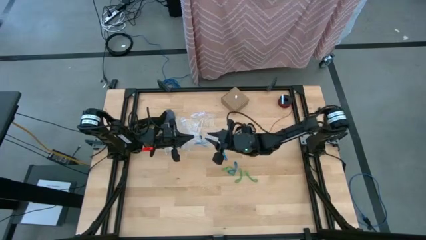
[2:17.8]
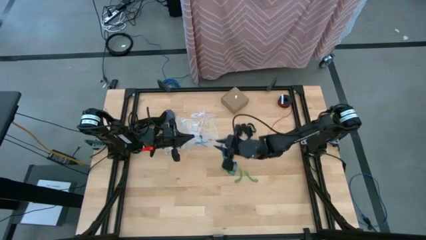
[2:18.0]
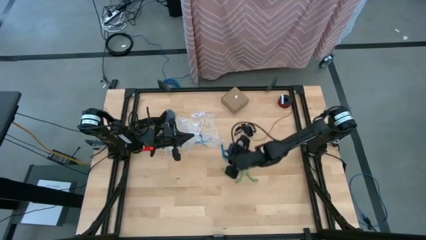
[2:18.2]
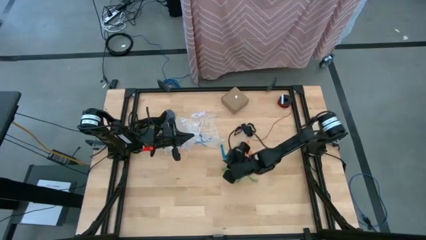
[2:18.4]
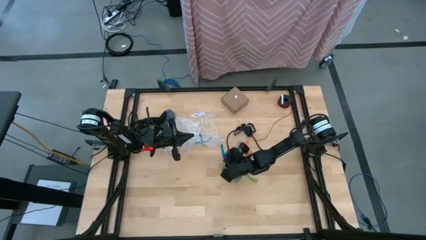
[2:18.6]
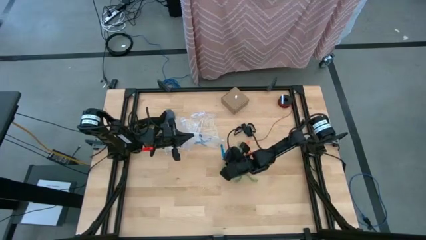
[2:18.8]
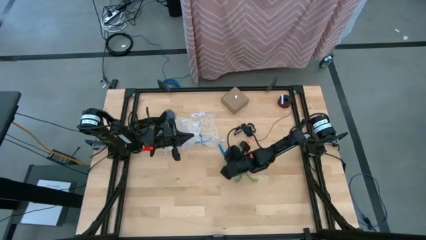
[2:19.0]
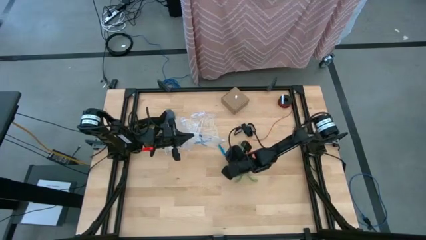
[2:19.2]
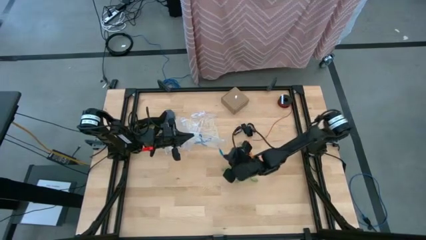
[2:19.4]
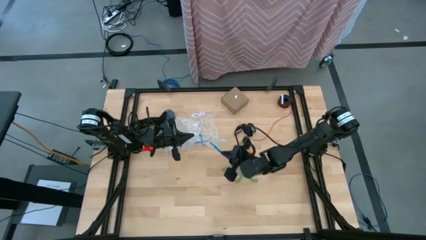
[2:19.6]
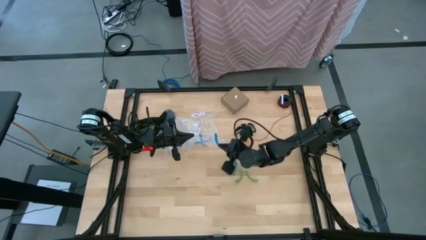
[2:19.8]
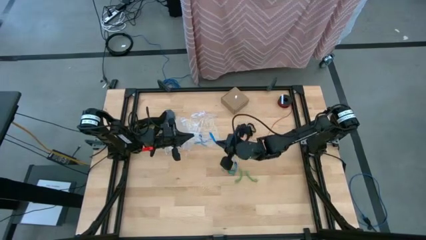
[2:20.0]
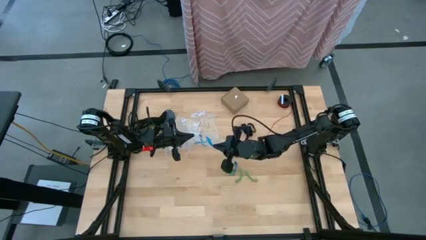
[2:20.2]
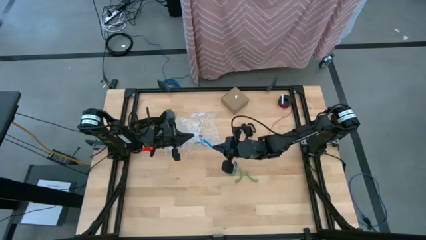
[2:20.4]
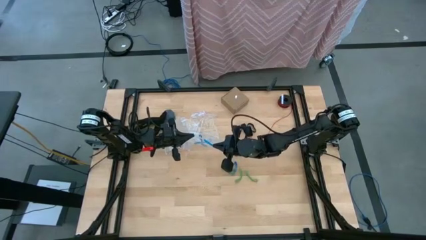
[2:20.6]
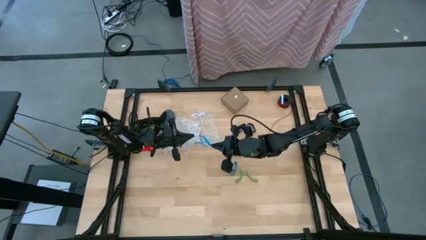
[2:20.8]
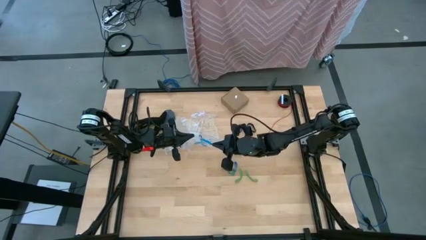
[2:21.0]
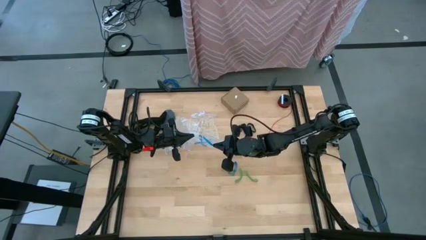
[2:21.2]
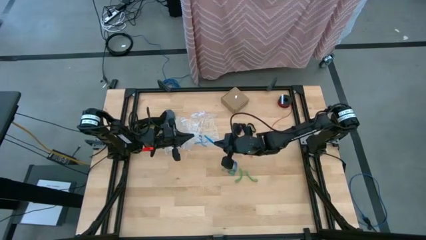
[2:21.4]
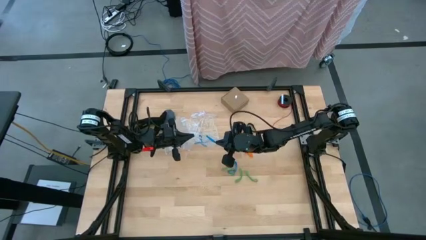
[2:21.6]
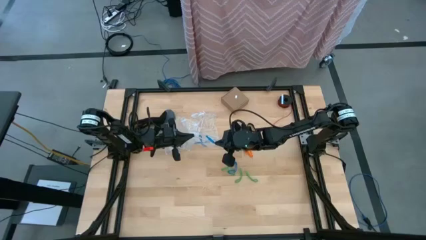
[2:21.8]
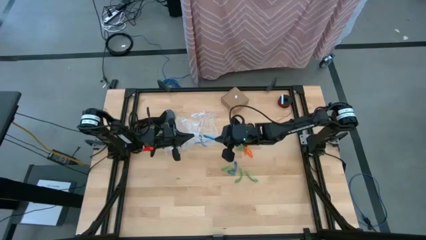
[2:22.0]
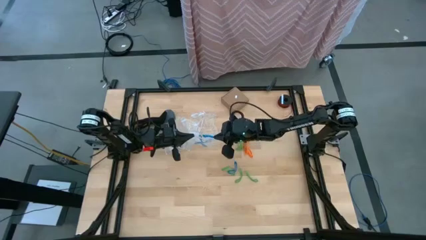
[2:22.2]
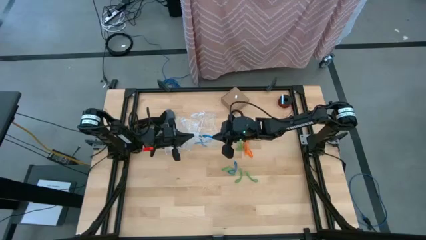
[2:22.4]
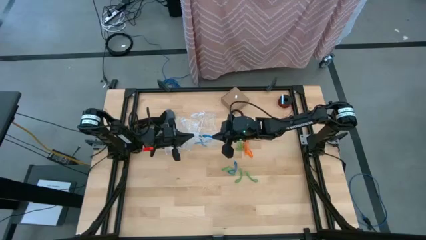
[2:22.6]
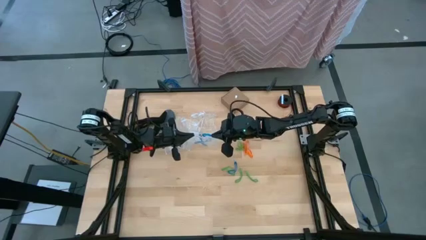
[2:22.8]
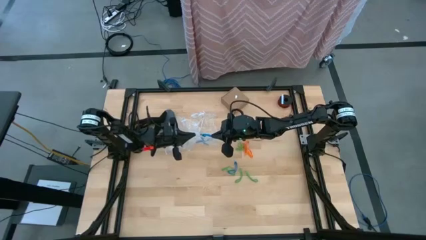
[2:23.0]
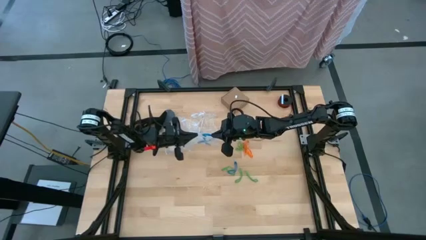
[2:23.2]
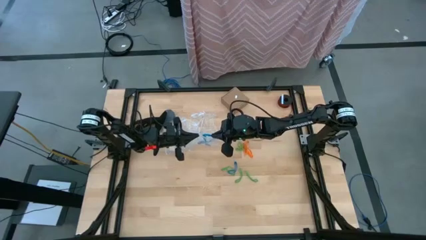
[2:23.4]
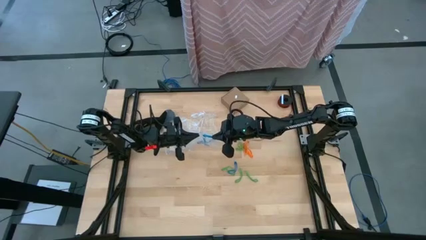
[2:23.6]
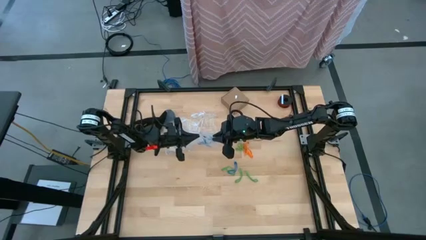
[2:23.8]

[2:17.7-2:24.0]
Task: Sort rubber bands
Put the blue rubber band into the transparent zip bag

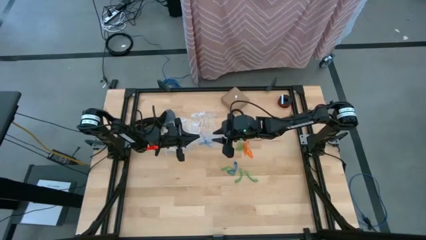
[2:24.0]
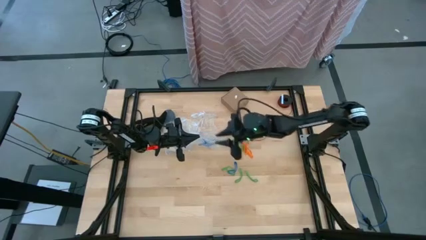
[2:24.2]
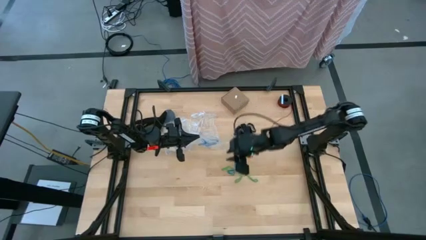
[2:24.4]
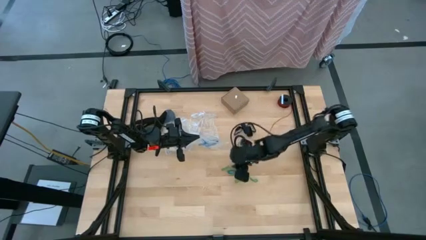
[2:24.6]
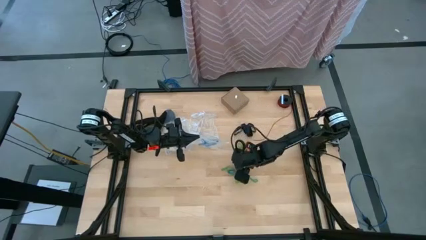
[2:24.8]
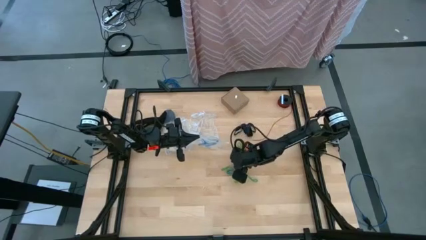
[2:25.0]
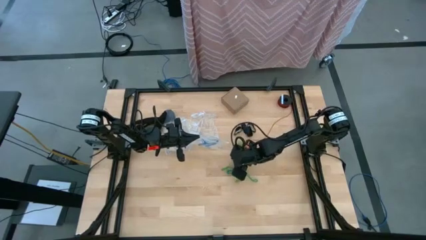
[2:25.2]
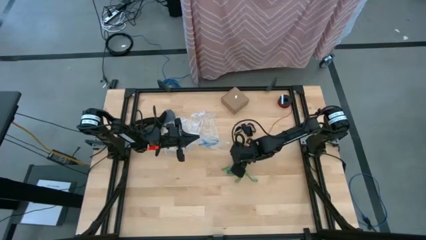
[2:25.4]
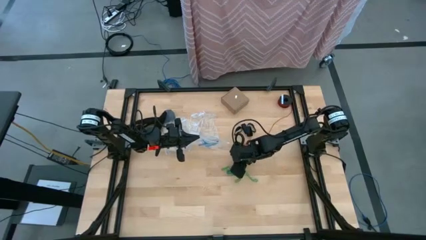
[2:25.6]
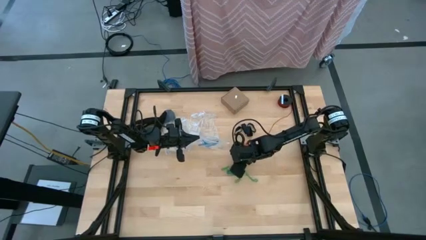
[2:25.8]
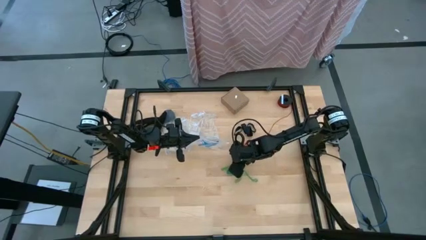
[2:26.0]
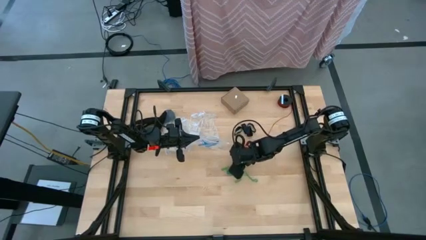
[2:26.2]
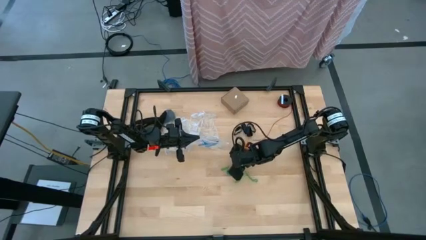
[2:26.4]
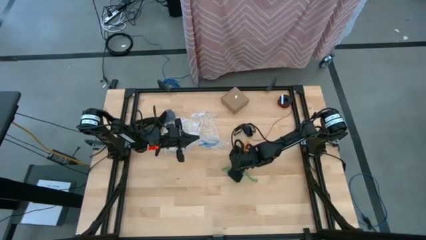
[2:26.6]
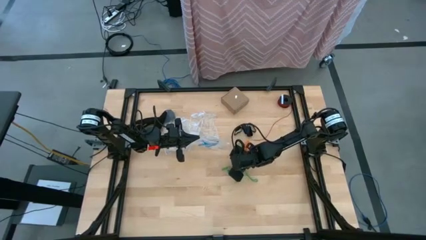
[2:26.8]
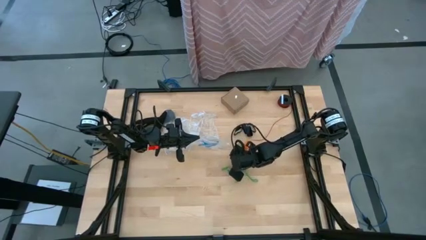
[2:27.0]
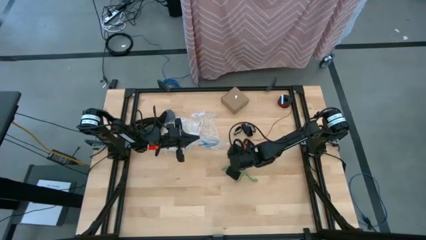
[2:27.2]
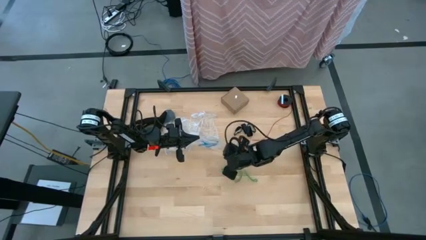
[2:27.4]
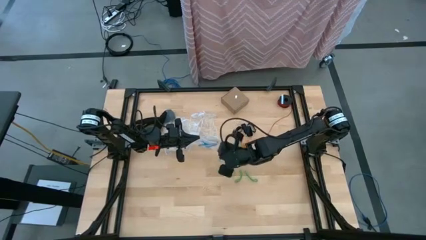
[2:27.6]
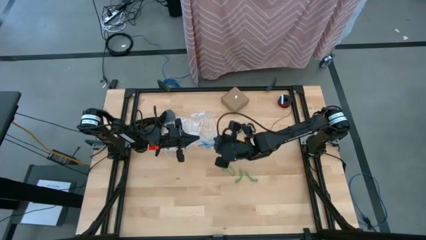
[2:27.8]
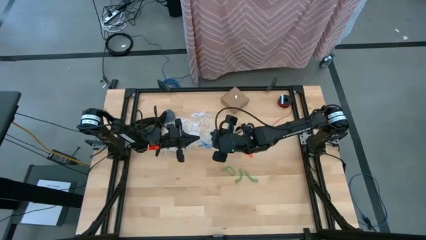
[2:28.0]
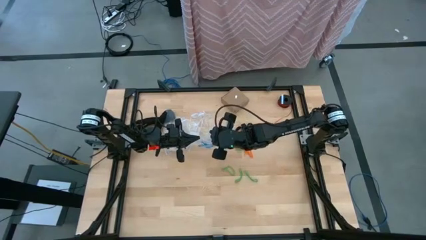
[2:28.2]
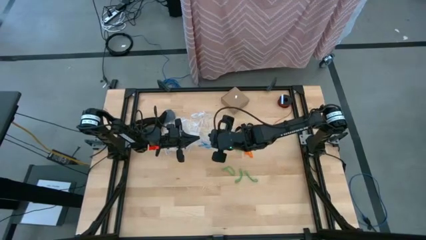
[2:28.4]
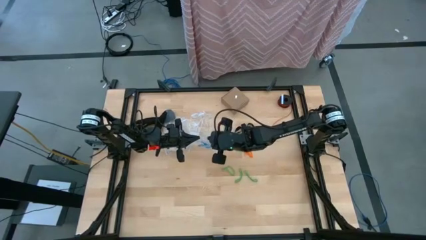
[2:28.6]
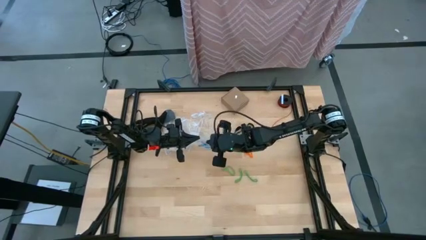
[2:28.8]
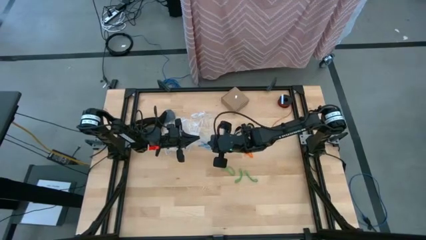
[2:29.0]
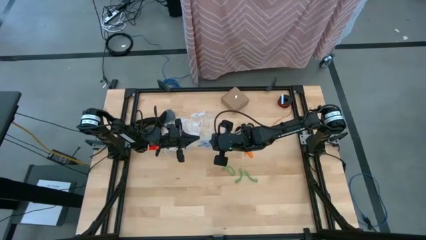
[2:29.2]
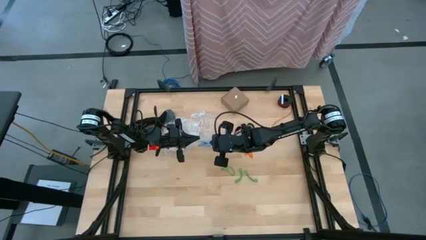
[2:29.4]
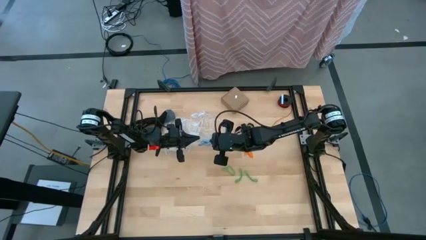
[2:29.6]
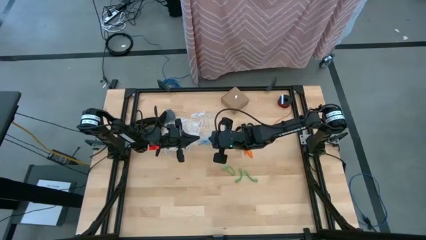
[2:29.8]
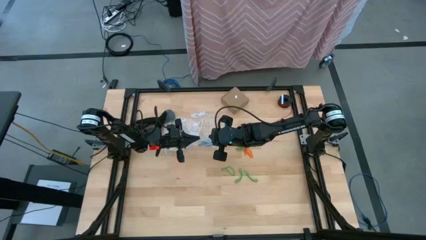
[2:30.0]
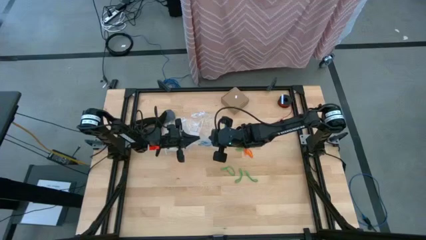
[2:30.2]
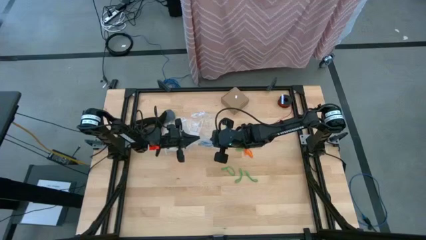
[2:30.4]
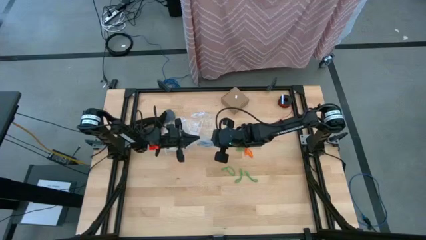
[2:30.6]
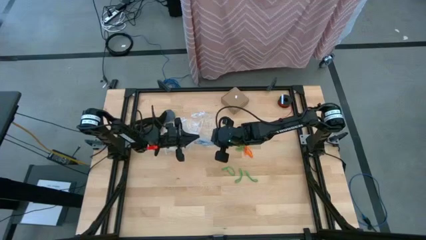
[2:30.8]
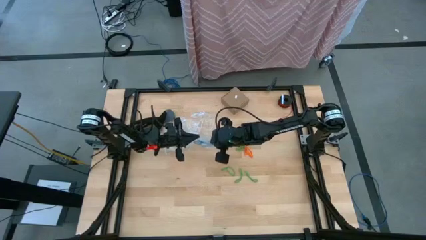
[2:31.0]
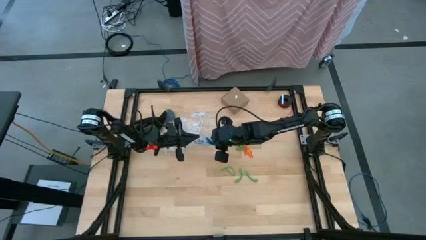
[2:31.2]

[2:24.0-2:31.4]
Put the blue rubber band into the transparent zip bag

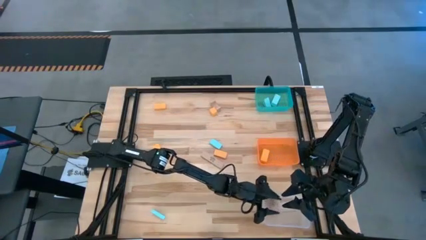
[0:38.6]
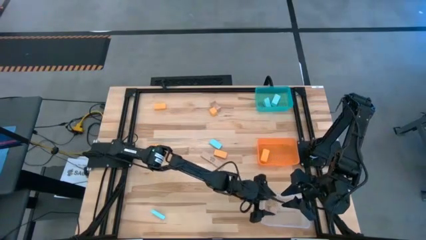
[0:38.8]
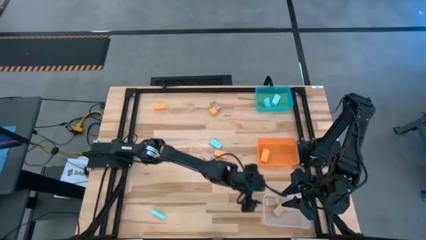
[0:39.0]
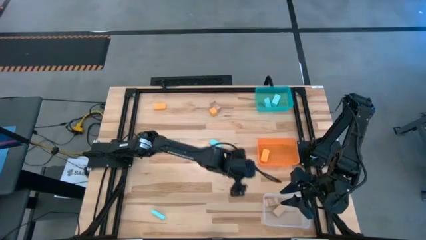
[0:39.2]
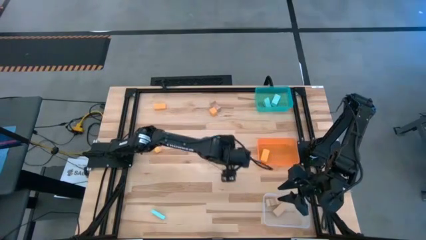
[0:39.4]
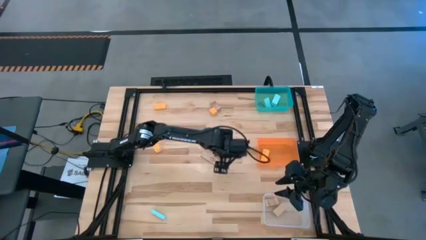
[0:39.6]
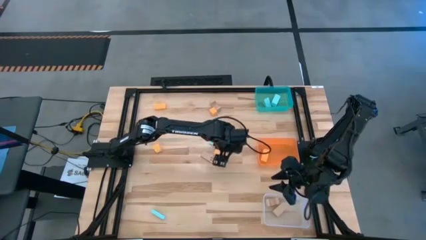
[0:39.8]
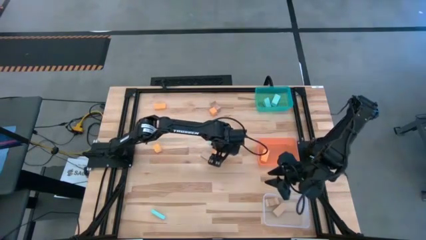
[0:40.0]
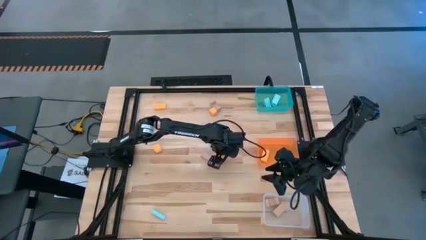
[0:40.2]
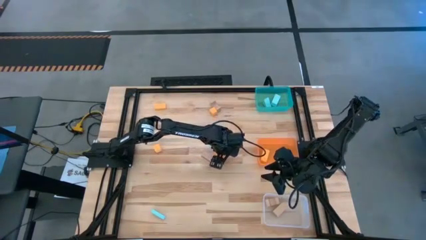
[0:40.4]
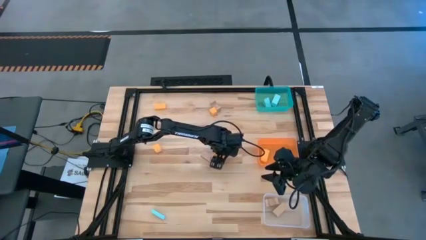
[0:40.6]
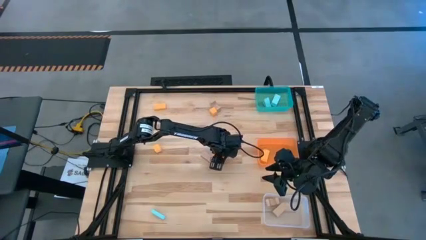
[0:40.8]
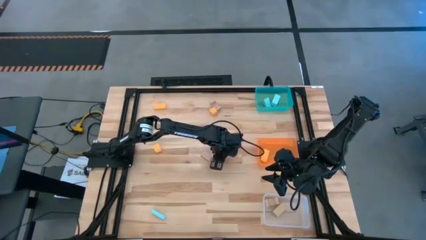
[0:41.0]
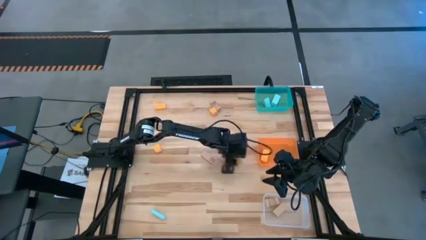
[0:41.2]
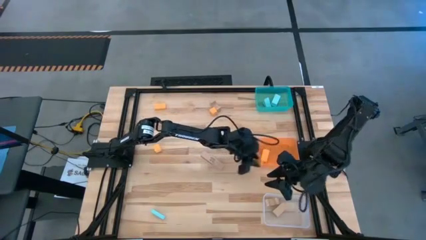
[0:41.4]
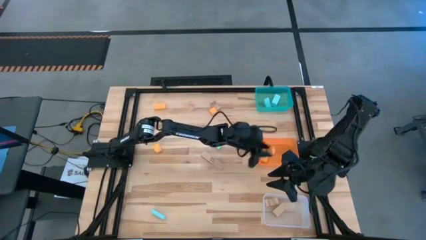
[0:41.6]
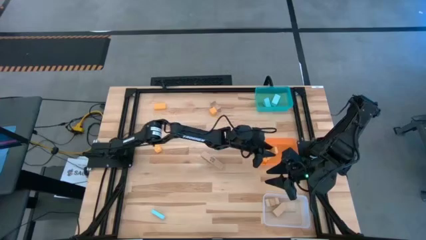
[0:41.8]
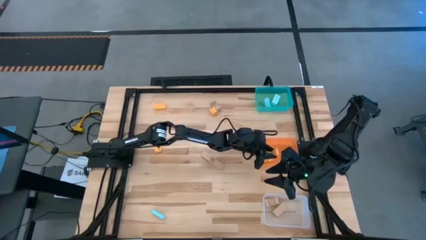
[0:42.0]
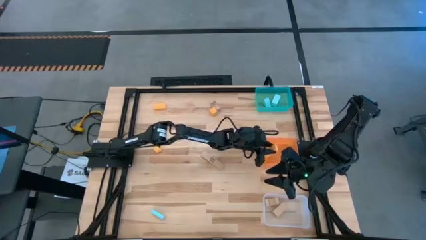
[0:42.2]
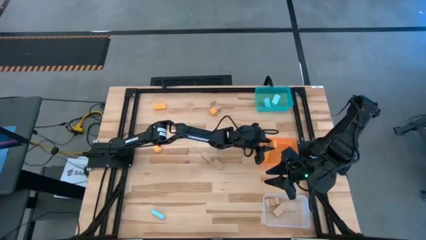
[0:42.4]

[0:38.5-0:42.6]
Task: Sort & place blocks by color
Put the orange block into the orange bin
